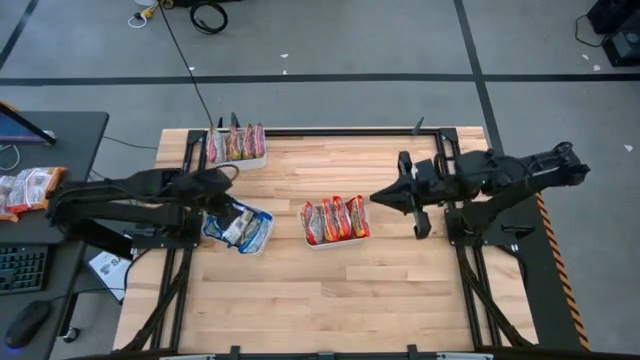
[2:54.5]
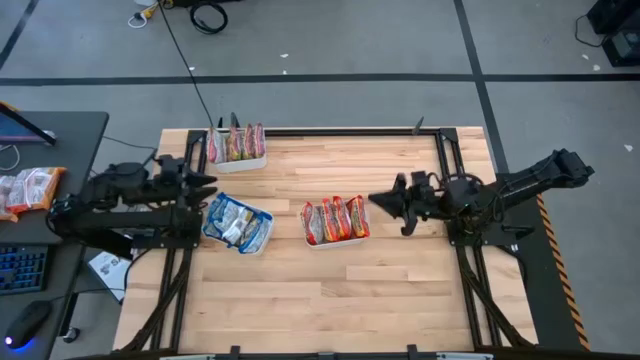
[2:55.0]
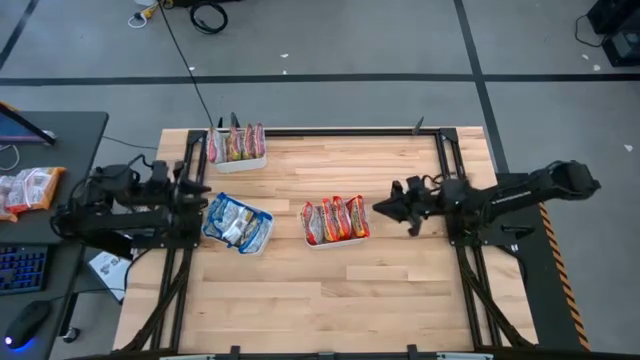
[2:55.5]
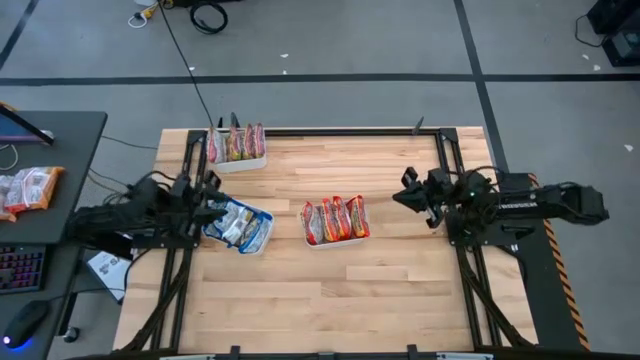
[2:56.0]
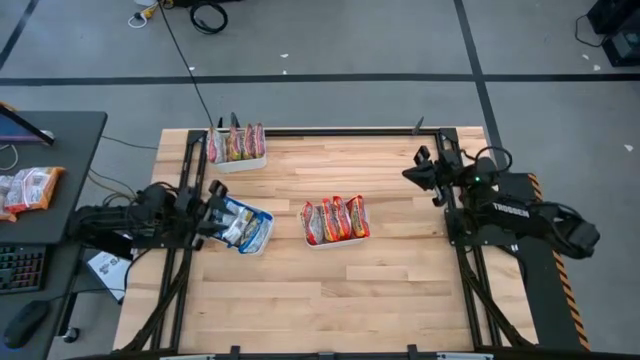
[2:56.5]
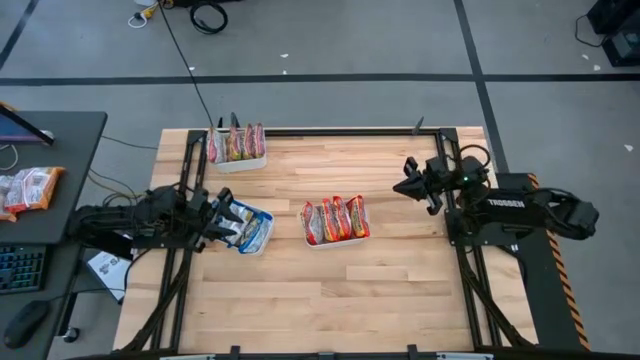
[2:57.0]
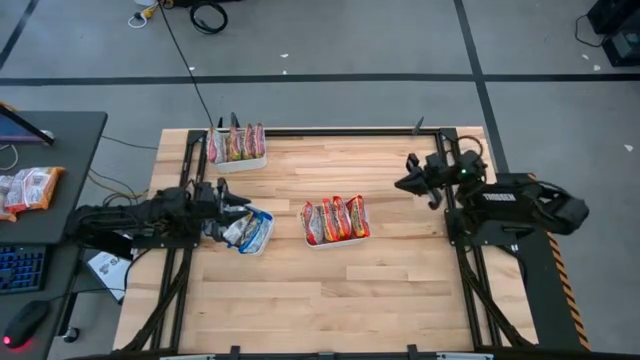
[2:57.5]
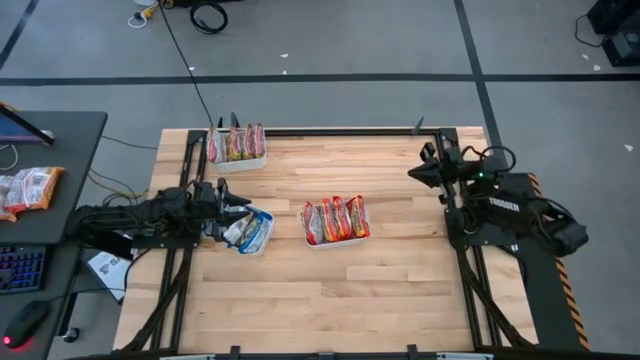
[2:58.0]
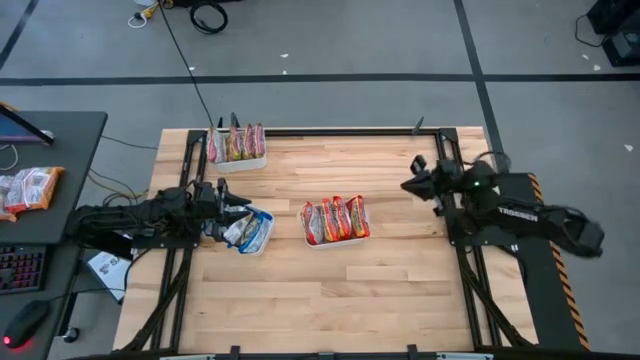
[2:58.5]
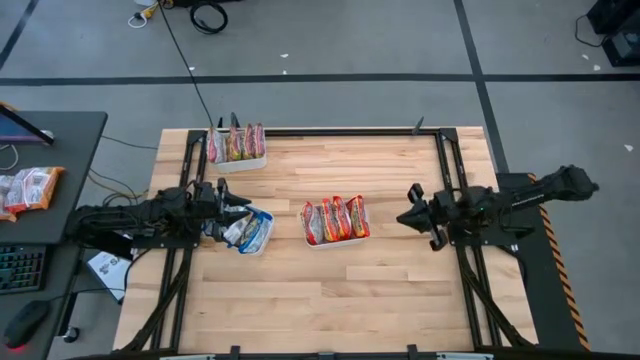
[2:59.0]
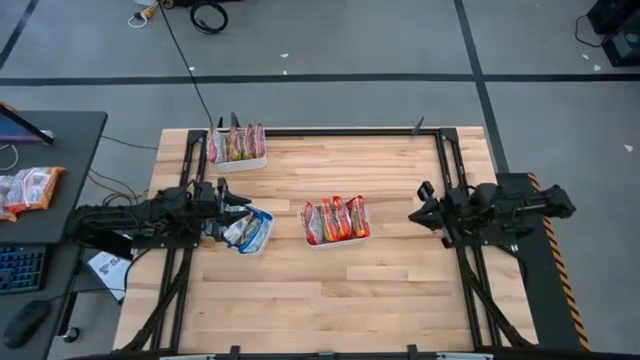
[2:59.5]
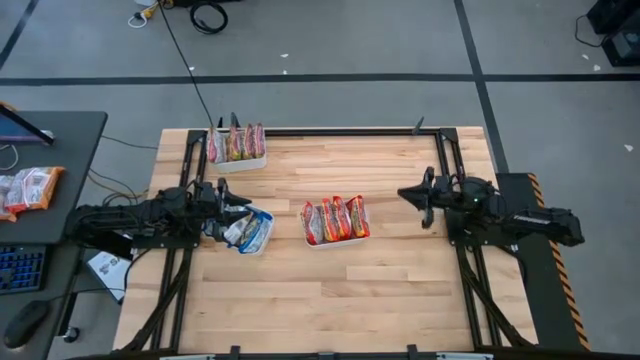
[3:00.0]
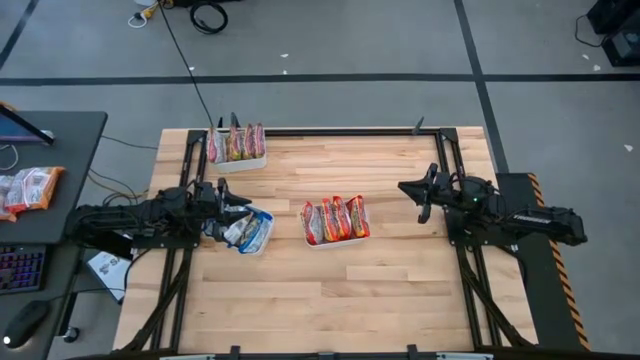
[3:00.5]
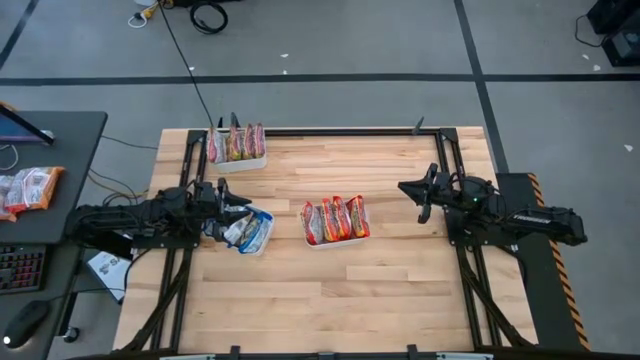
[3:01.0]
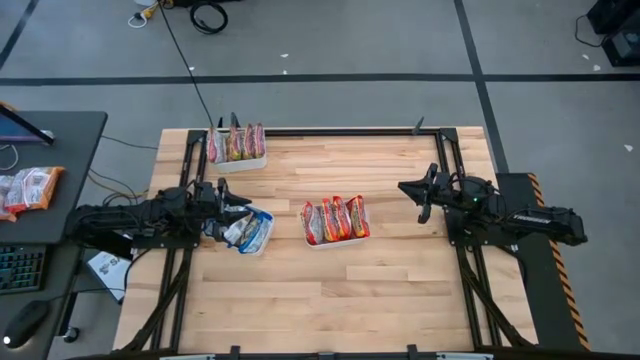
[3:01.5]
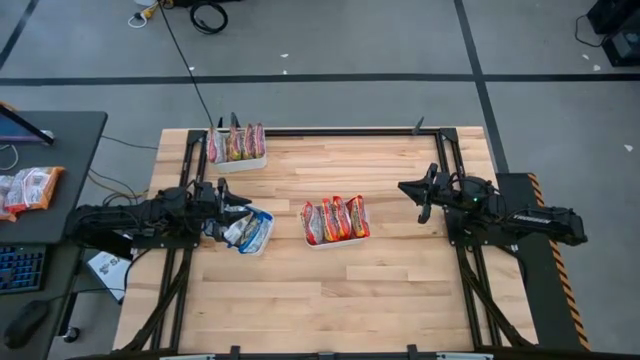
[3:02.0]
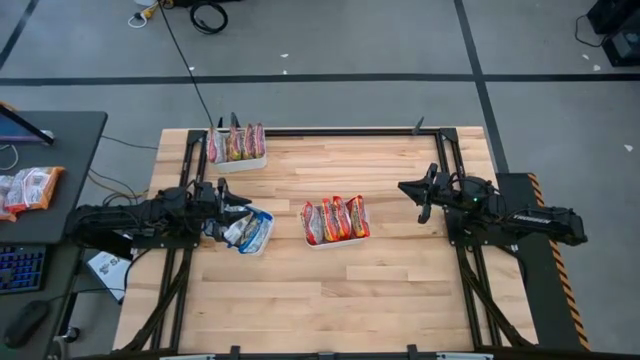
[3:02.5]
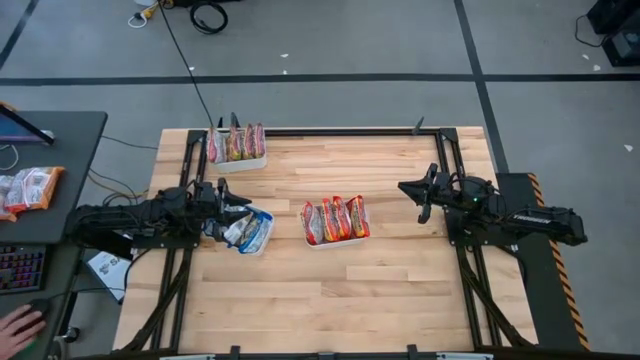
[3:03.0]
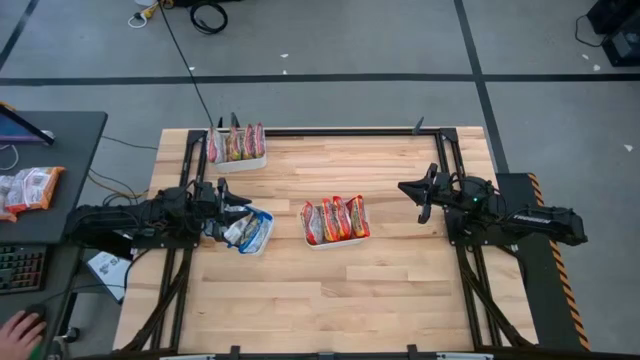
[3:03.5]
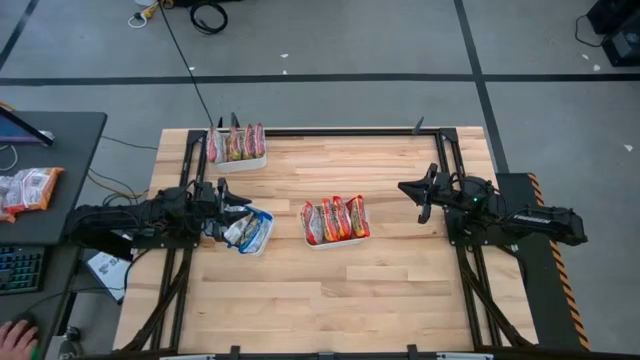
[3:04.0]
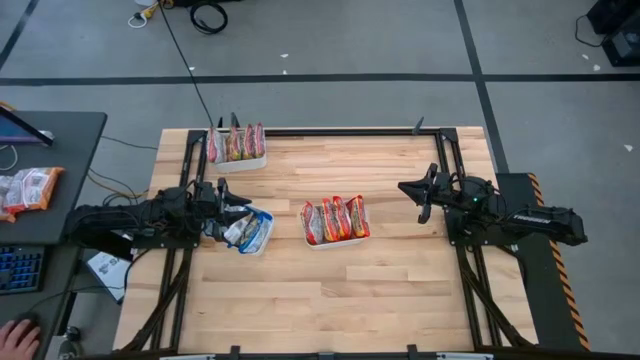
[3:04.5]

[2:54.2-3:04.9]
Task: Sort Maruchan noodles
Return to Home Position

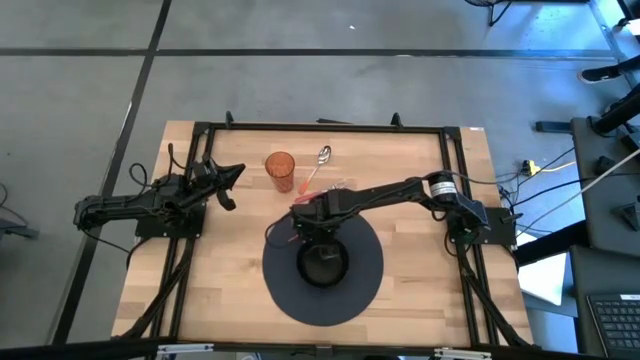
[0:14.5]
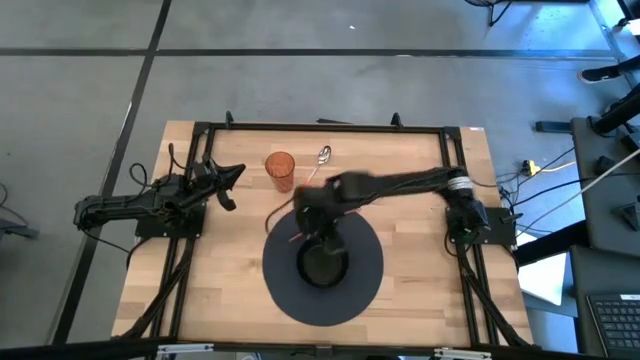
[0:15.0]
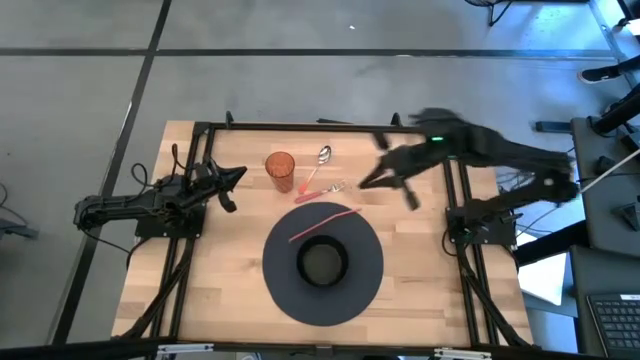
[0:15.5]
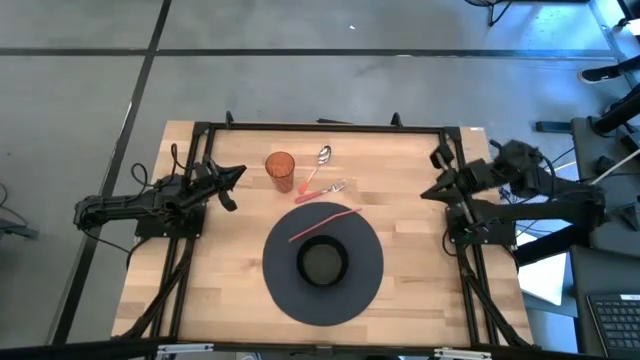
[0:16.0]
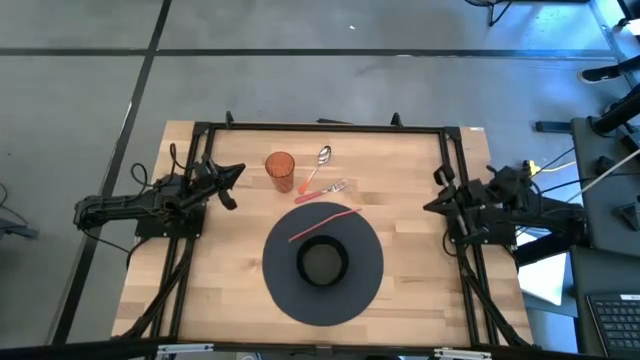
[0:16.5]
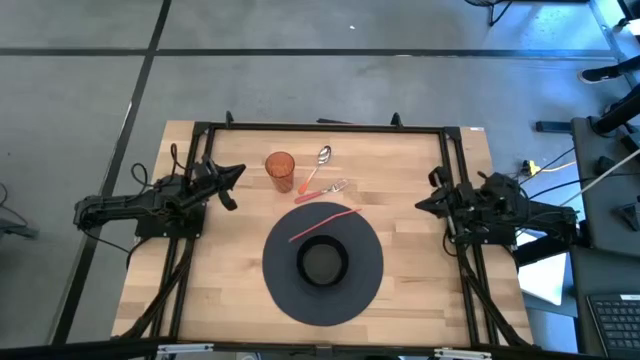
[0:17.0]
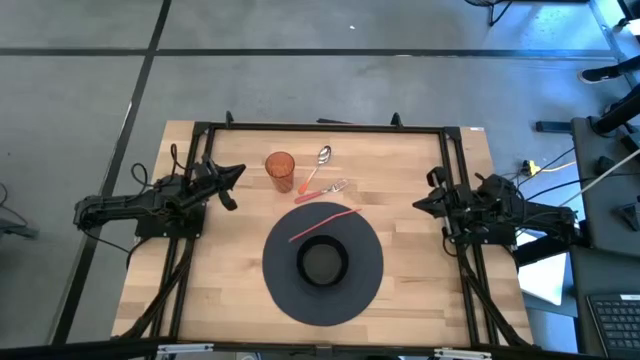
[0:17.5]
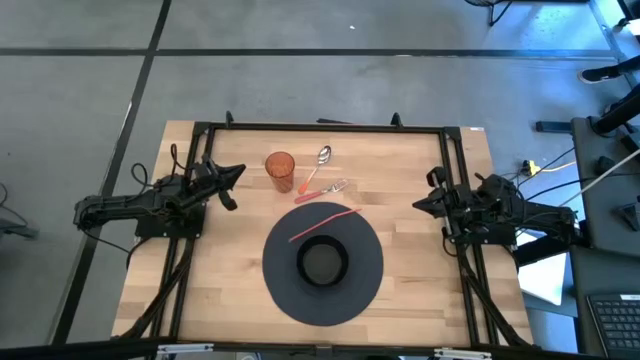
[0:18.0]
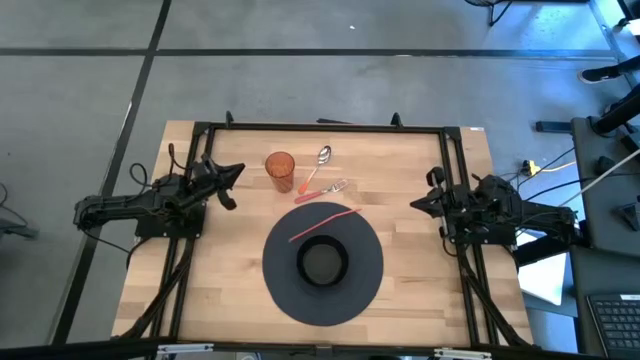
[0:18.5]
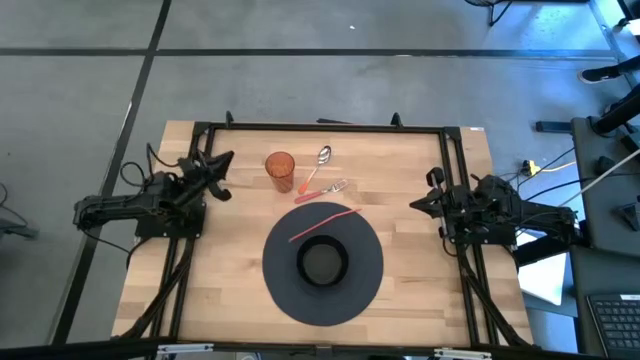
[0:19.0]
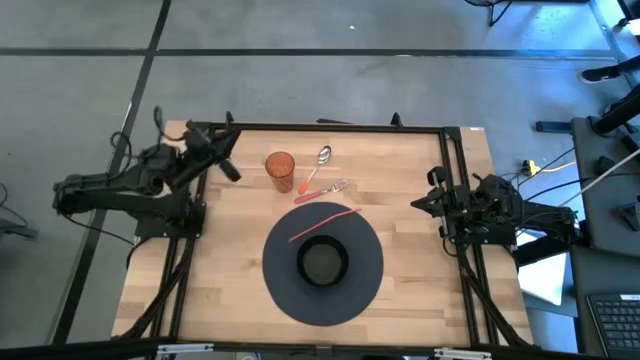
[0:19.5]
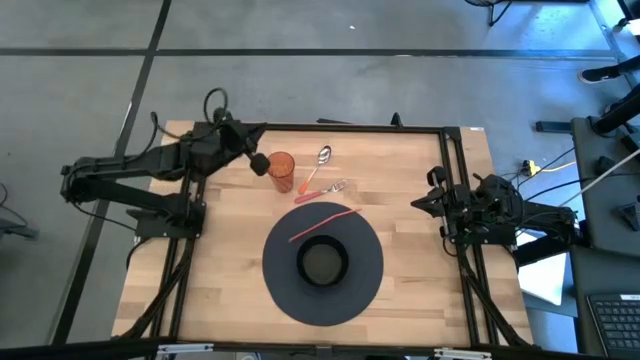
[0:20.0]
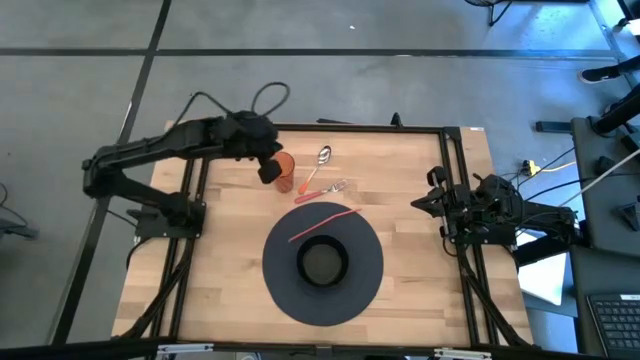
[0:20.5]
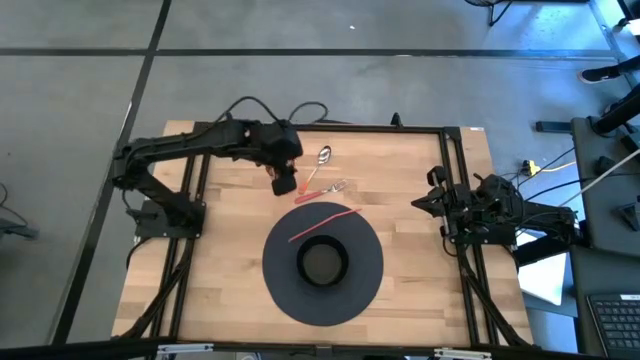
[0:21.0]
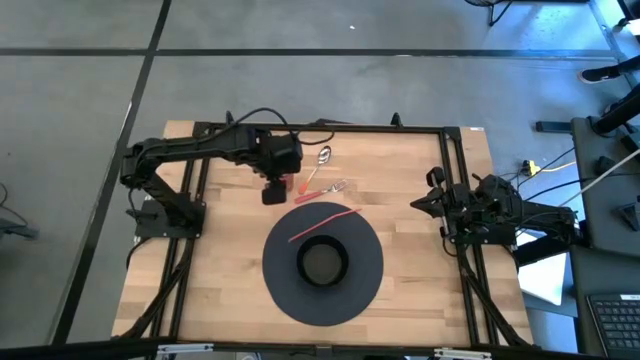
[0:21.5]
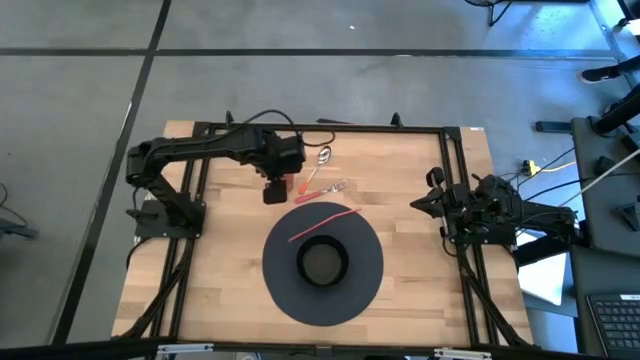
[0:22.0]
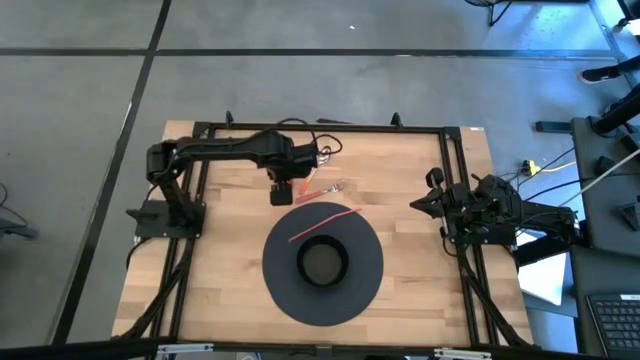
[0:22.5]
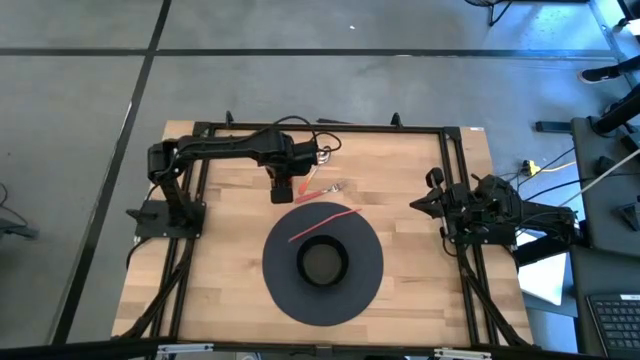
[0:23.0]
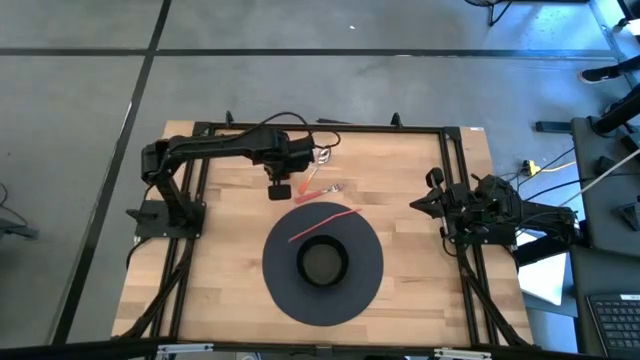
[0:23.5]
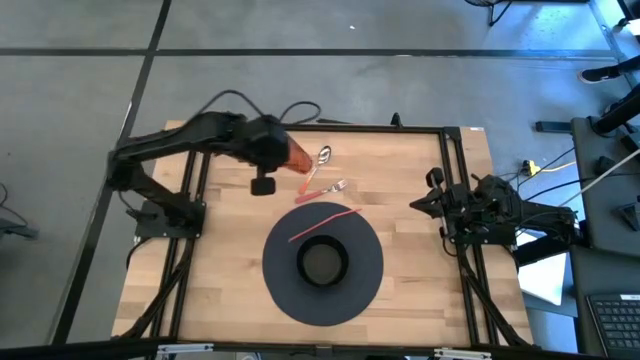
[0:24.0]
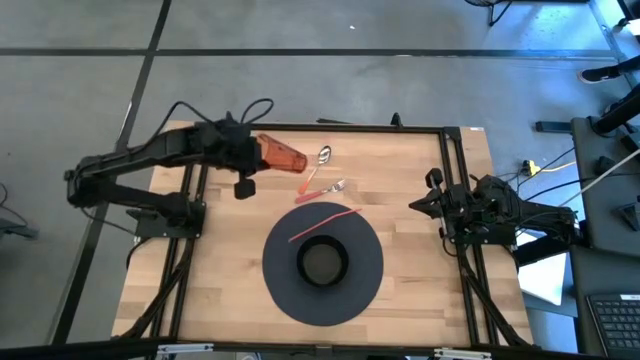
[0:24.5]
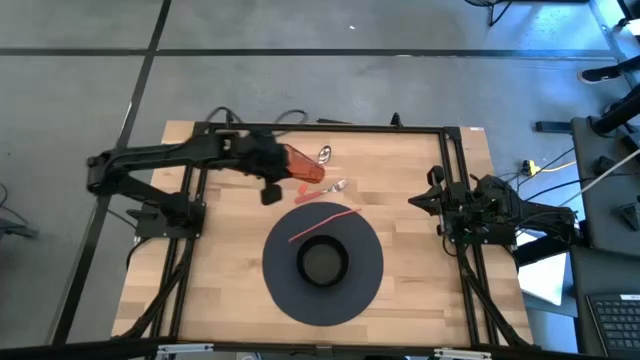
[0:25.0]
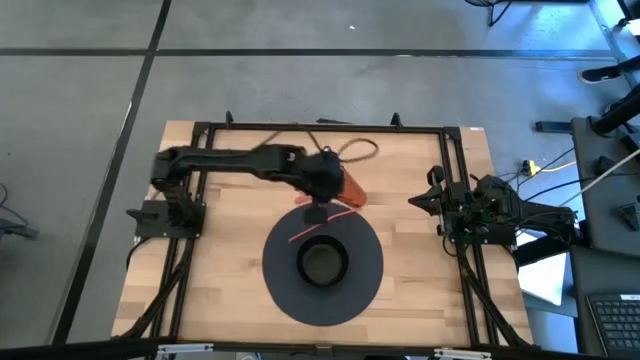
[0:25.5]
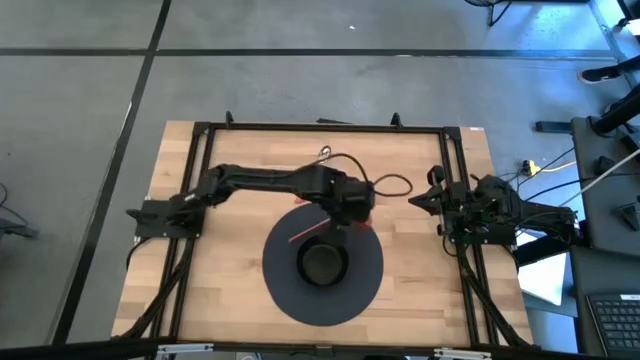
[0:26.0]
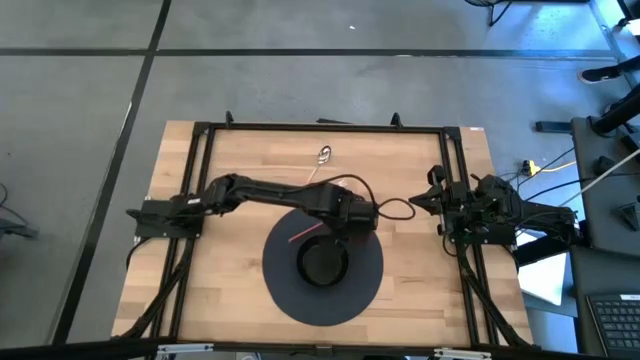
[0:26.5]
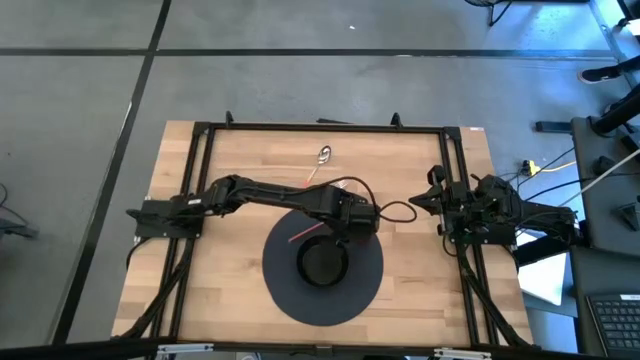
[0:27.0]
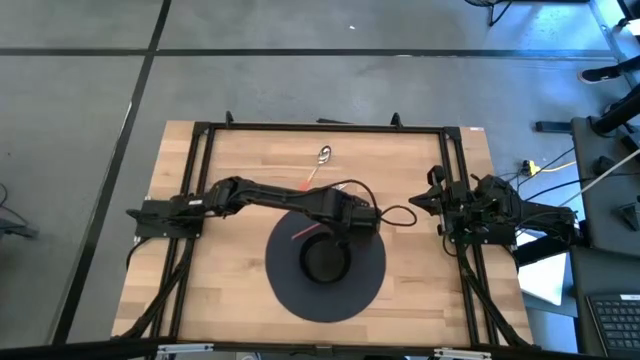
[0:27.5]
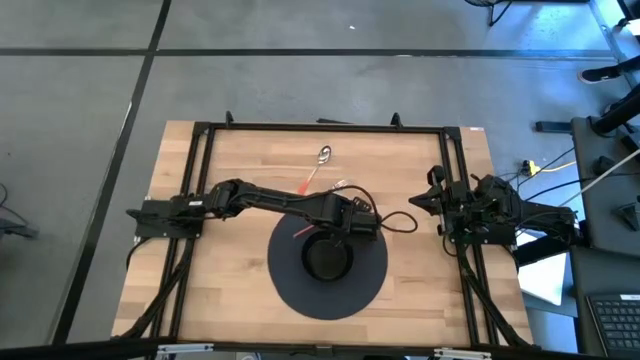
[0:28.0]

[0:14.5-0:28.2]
Task: Pick & Place Utensil
Put the orange cup on the black mat to the top right of the black bowl
